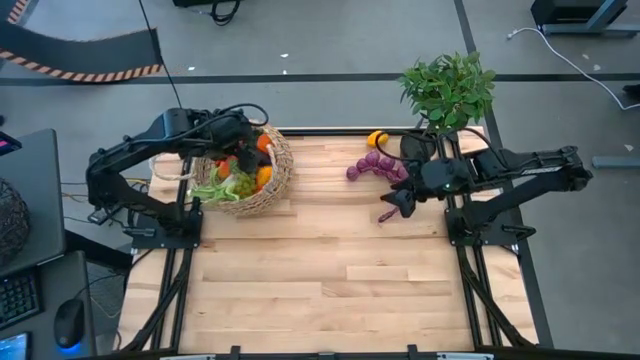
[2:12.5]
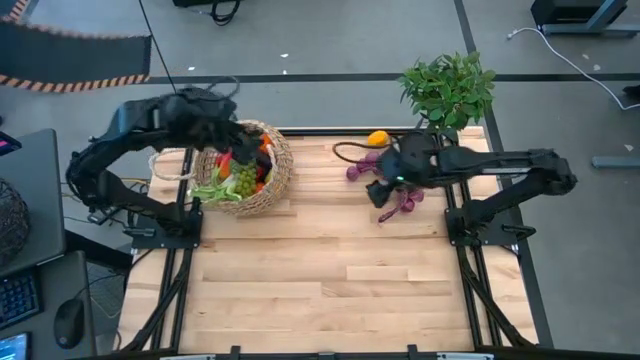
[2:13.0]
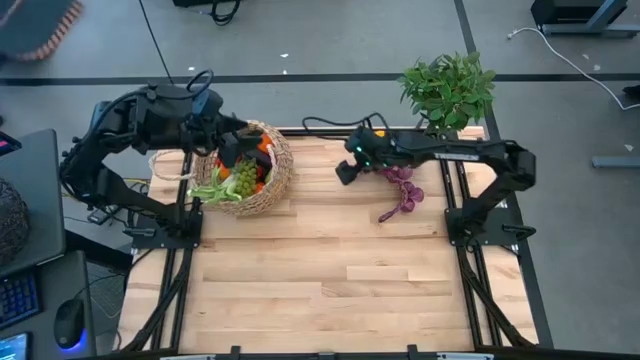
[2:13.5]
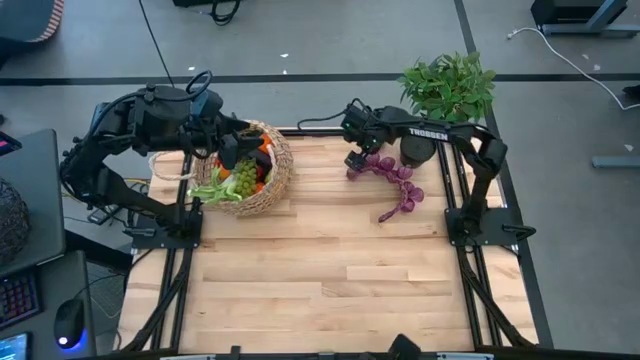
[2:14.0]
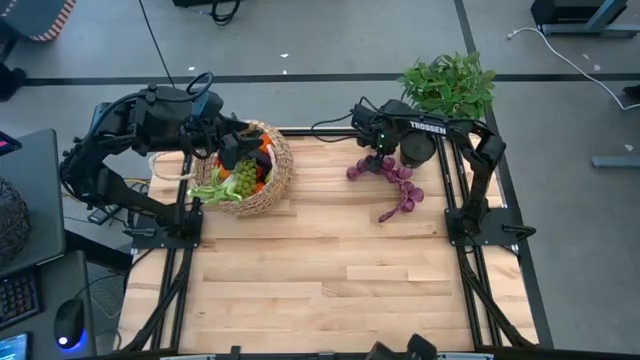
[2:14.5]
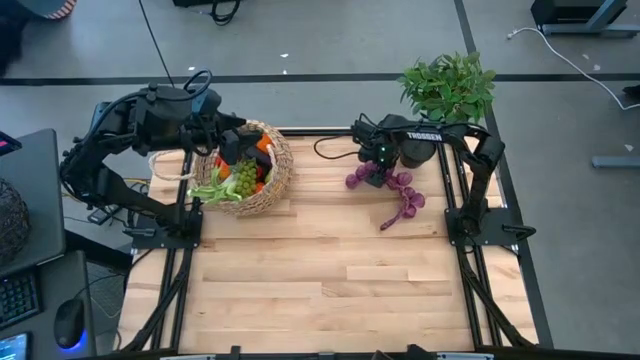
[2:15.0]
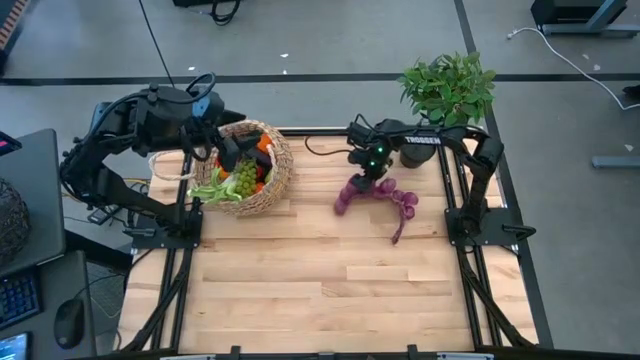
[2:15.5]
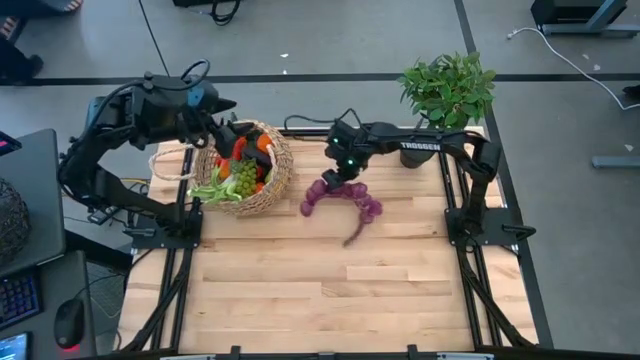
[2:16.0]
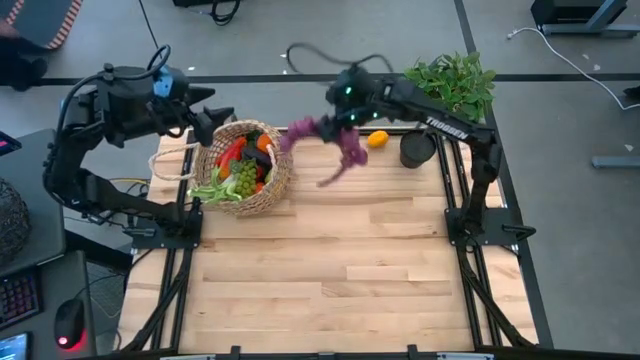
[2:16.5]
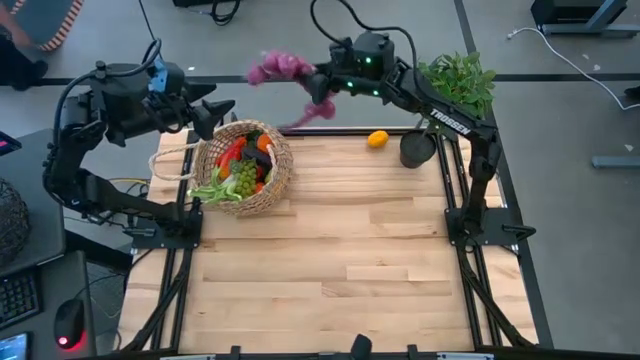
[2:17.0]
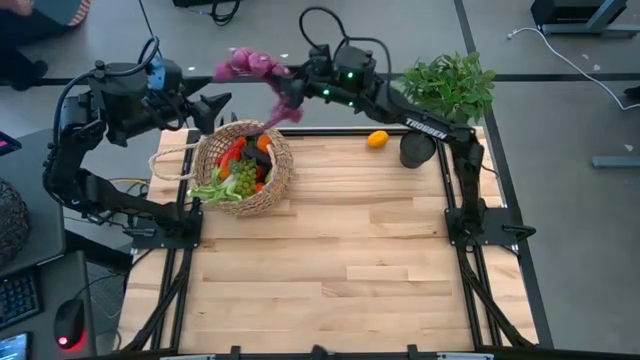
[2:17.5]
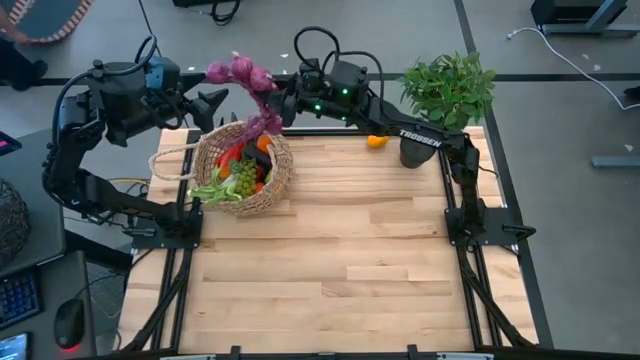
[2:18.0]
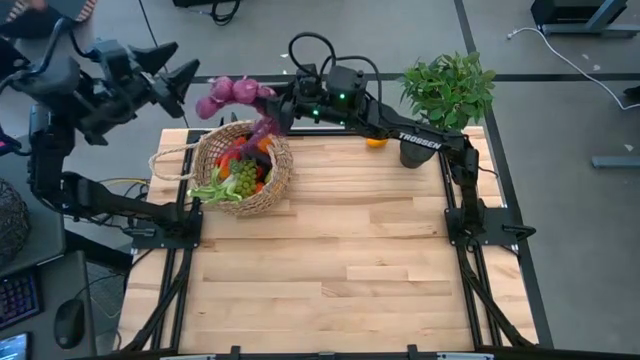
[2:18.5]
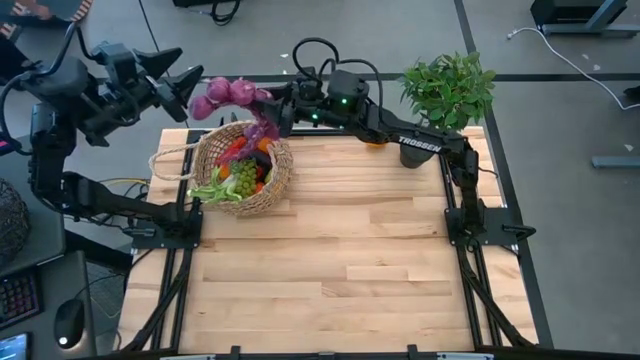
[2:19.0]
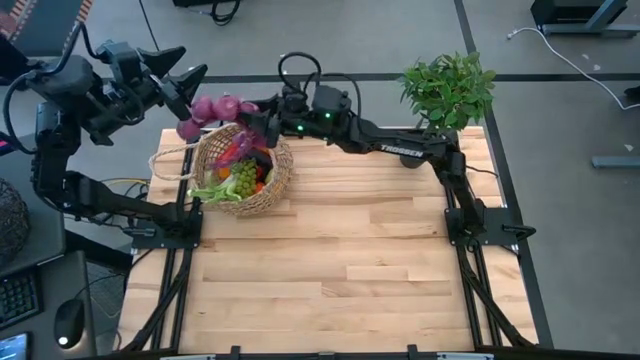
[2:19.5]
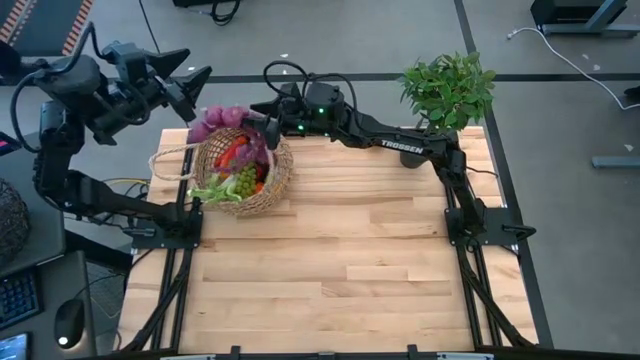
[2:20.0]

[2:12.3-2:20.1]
Task: Build produce basket
Put the purple garlic into the brown basket

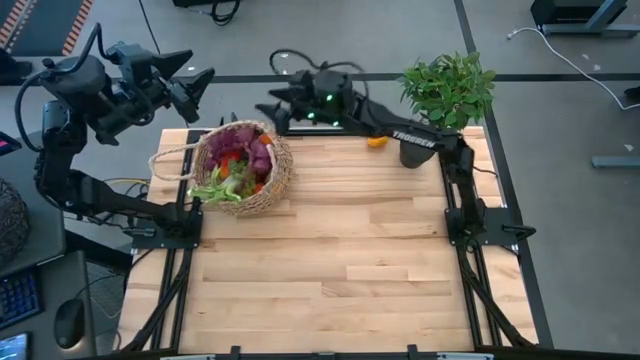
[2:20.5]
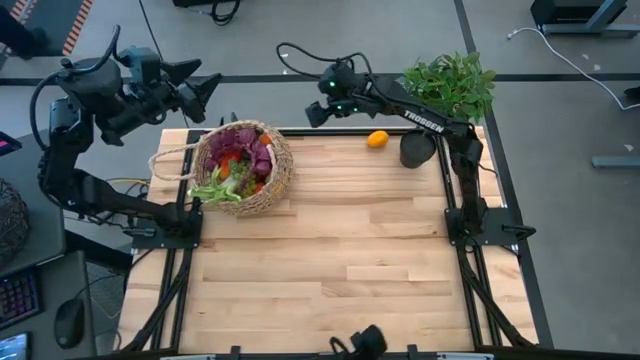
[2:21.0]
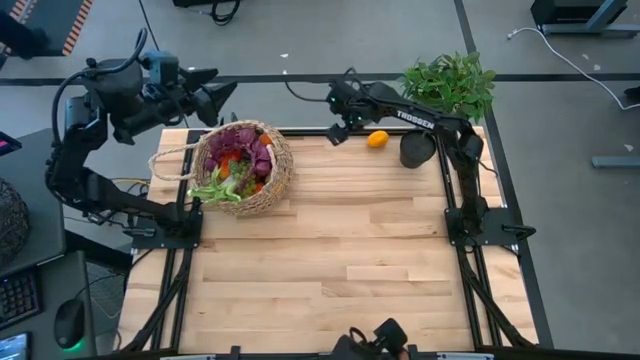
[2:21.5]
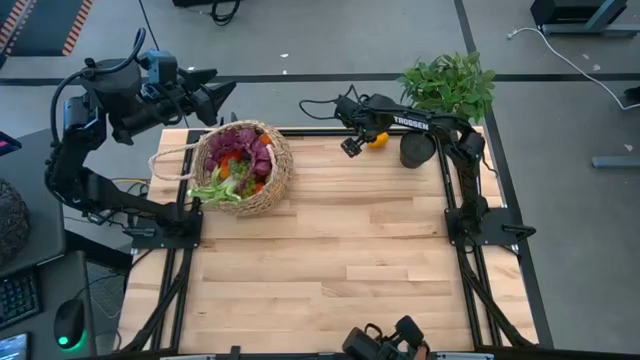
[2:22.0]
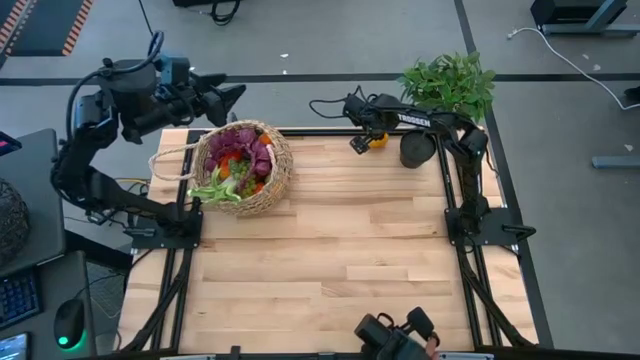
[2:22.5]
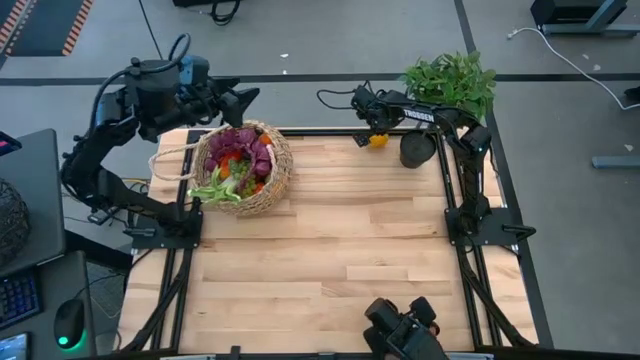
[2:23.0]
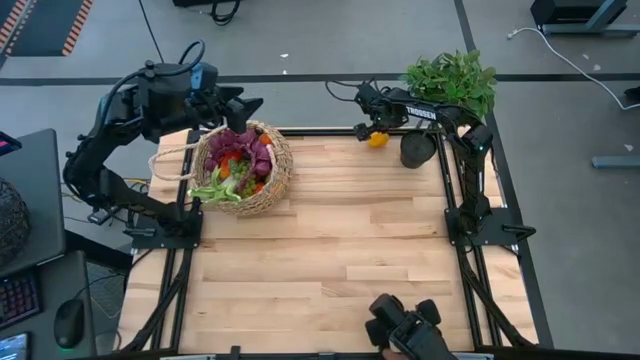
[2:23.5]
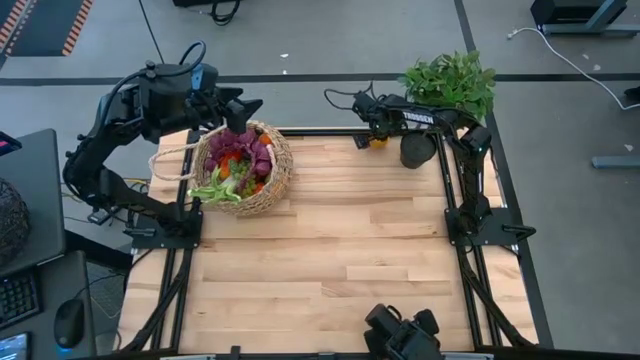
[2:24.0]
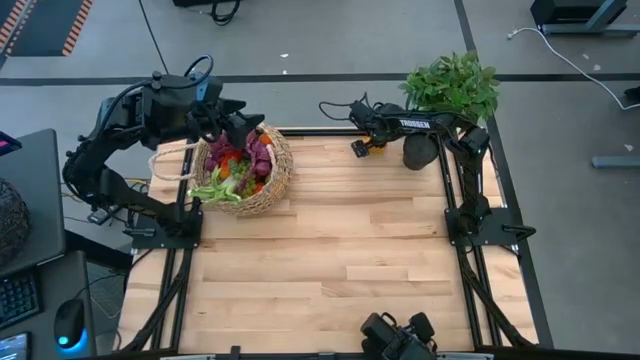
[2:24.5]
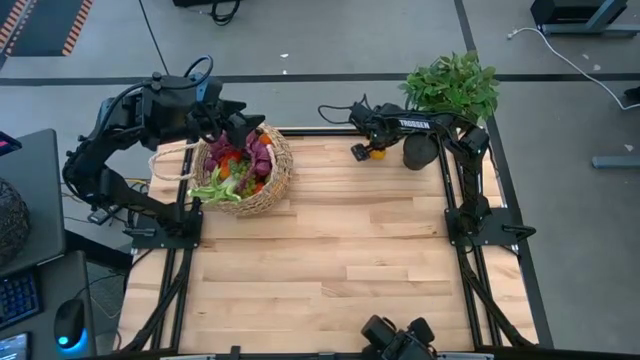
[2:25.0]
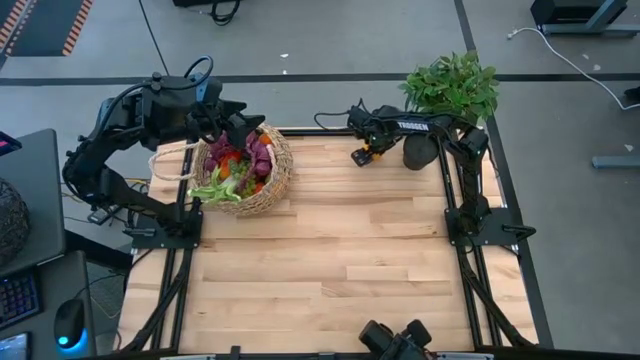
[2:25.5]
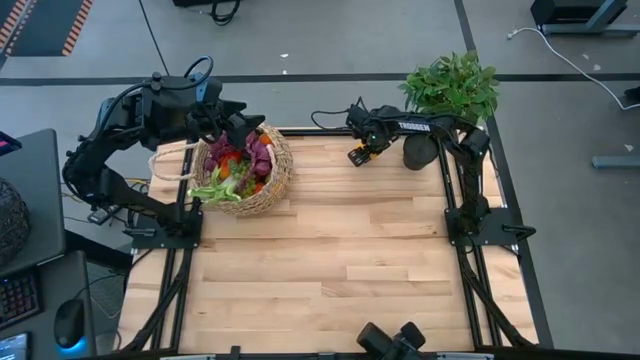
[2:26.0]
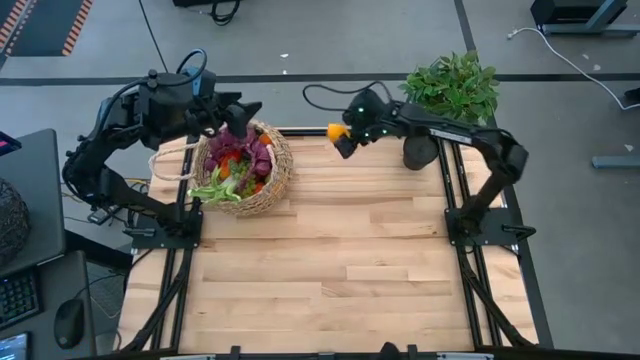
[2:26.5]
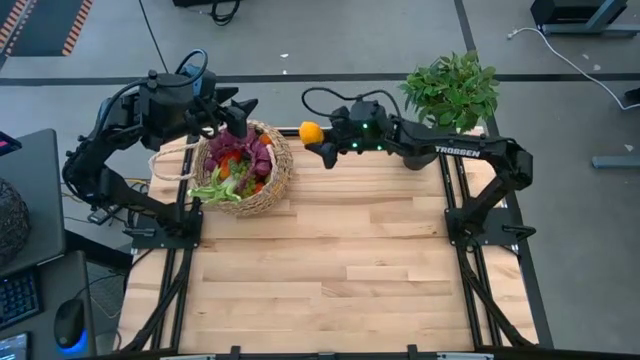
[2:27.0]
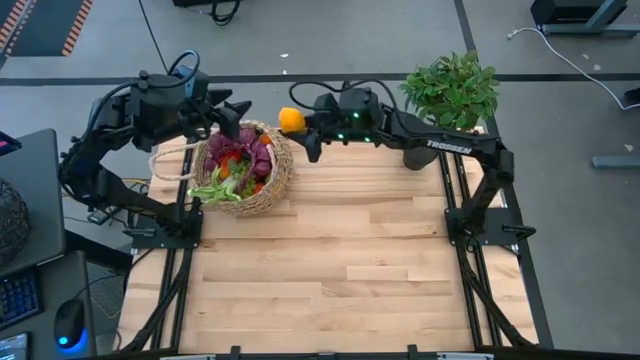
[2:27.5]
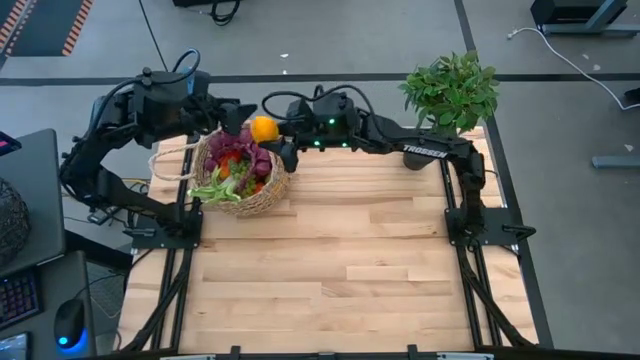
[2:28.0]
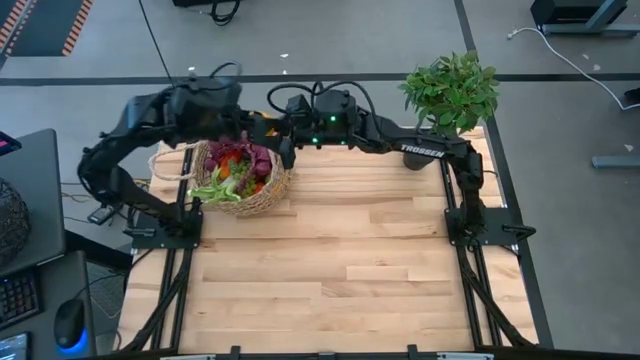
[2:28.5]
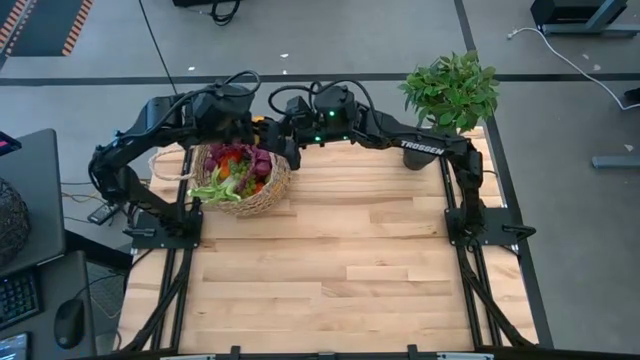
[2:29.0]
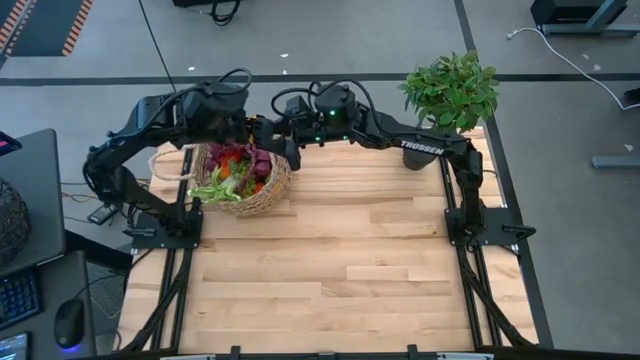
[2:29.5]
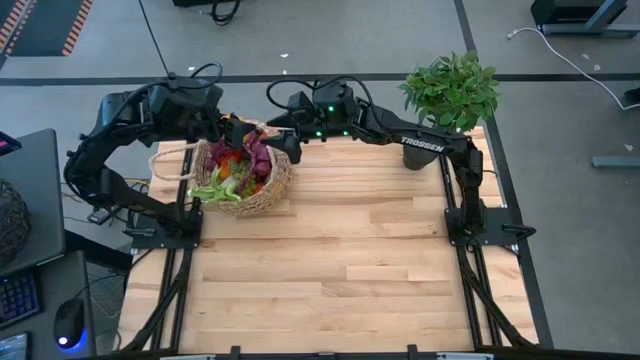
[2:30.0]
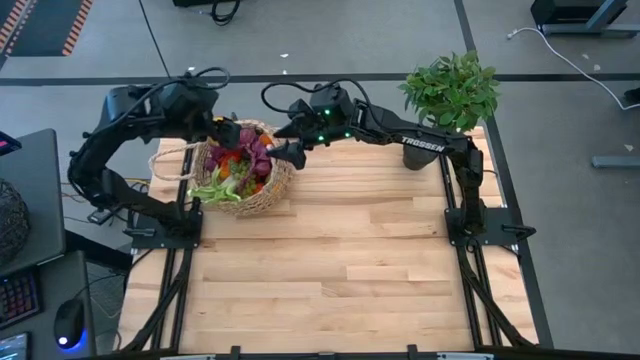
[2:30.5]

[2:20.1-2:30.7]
Put the yellow lemon into the brown basket

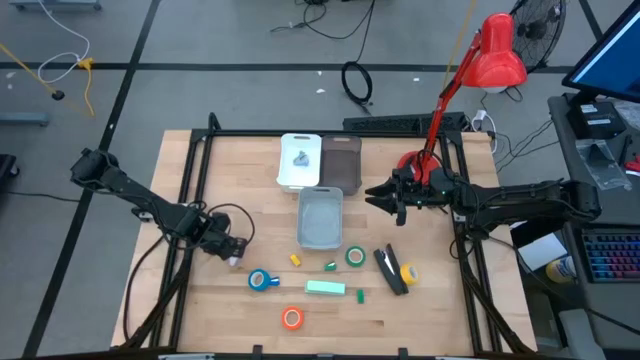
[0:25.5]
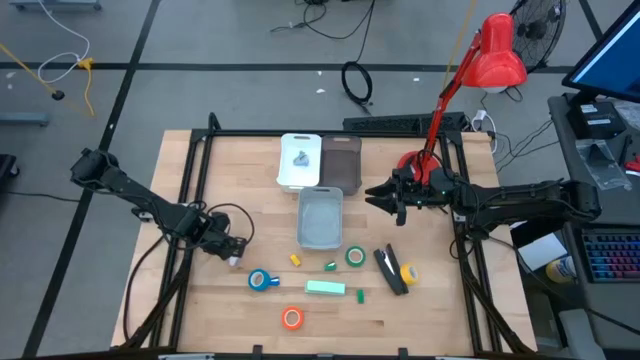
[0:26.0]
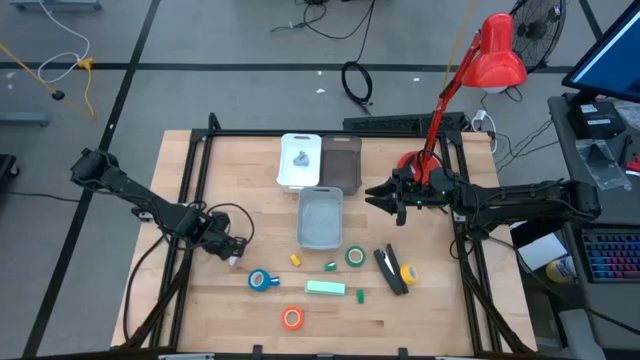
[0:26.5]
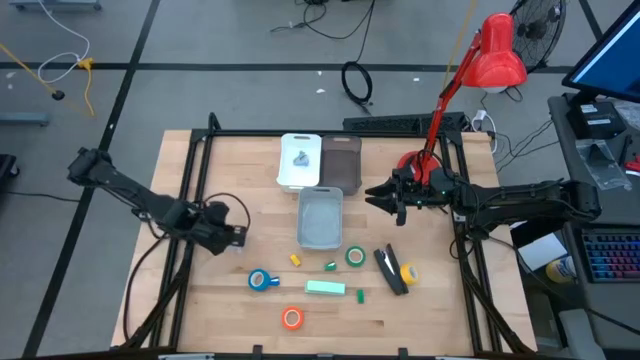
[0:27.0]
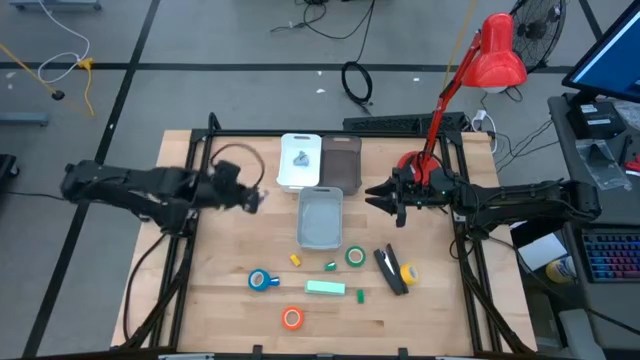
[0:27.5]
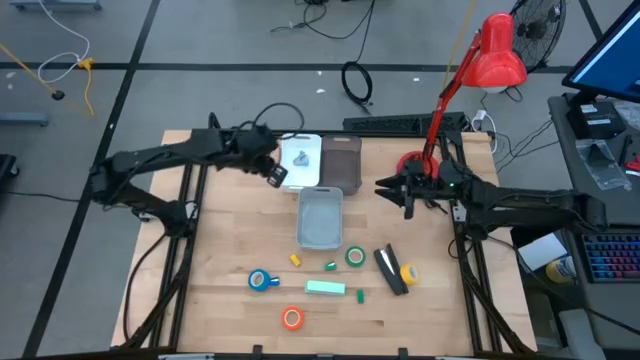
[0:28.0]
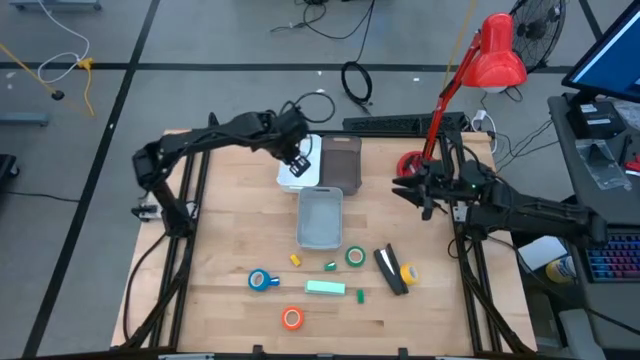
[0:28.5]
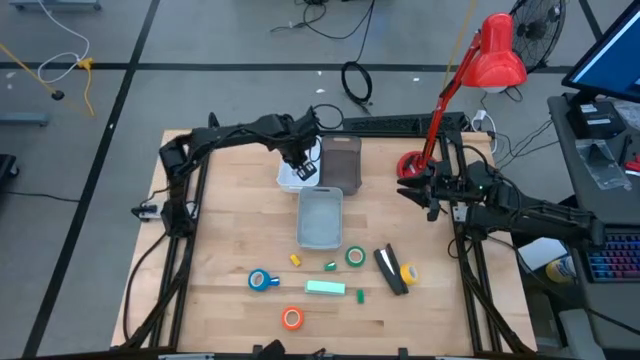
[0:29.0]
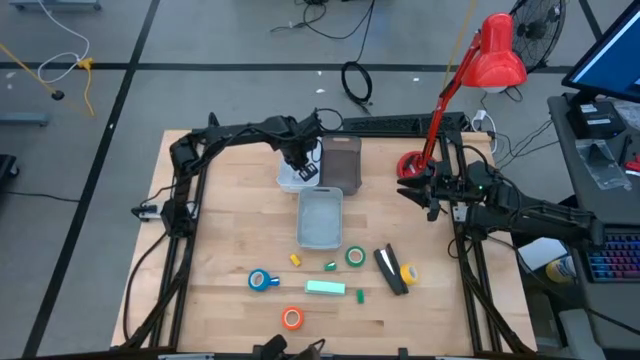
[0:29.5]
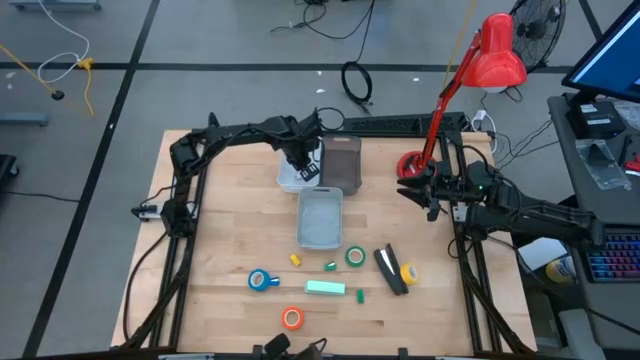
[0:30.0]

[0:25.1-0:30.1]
Task: Pick and place Stapler, Stapler remover, tape
Put the violet staple remover into the white bin
